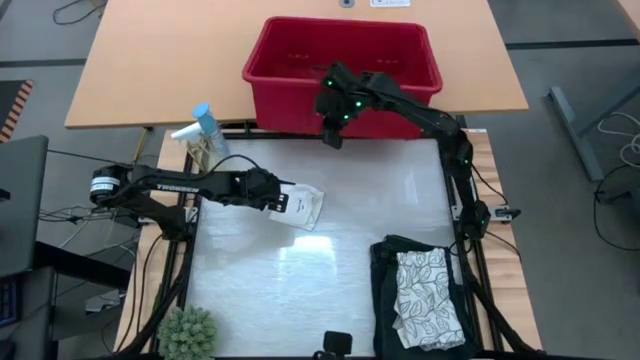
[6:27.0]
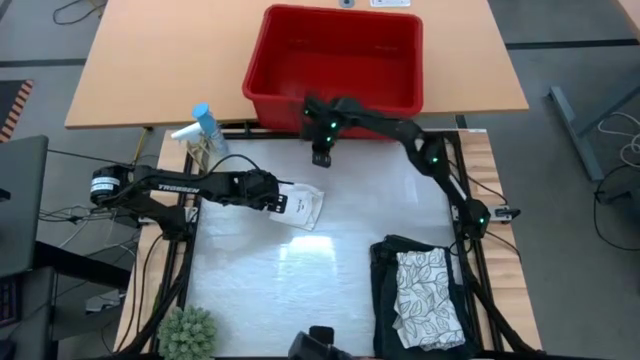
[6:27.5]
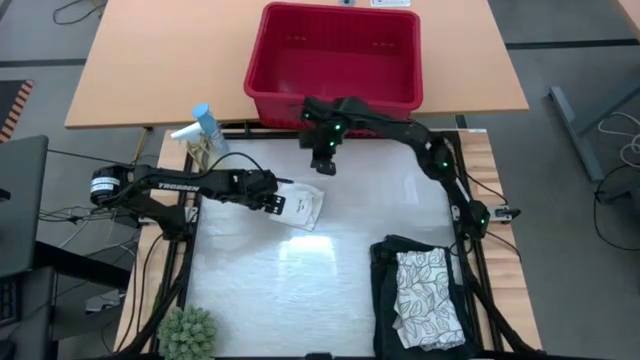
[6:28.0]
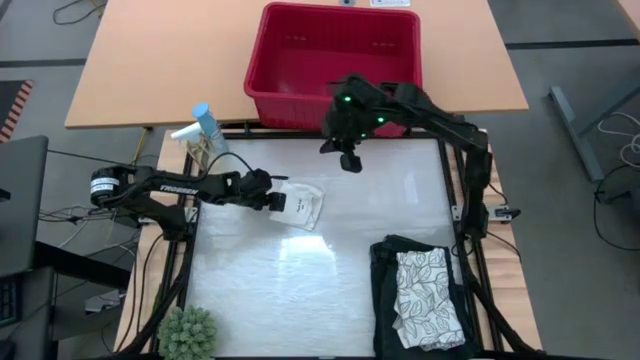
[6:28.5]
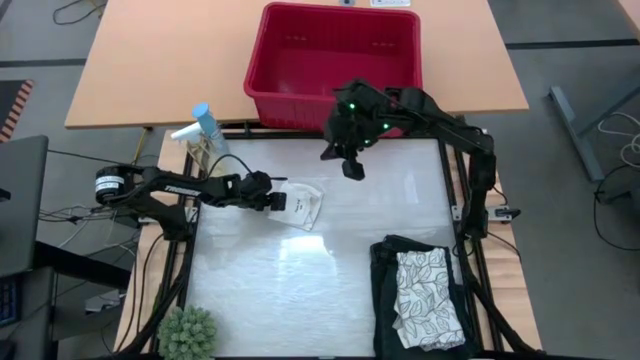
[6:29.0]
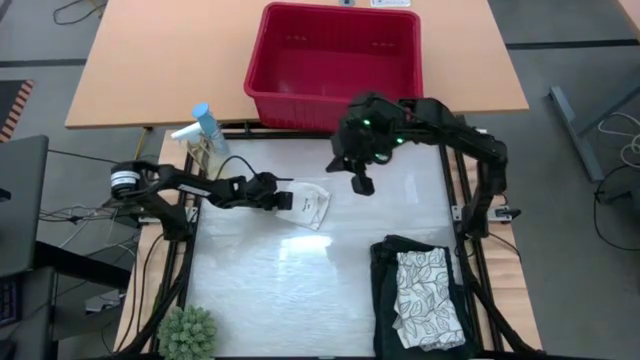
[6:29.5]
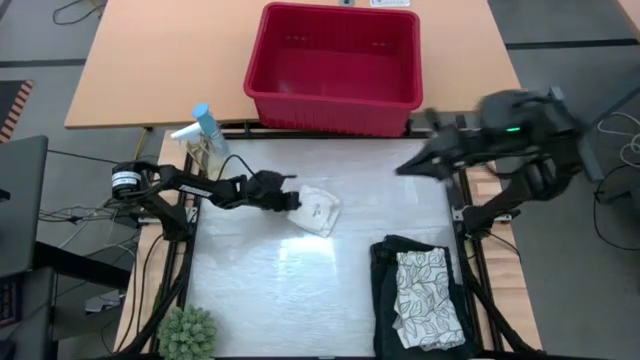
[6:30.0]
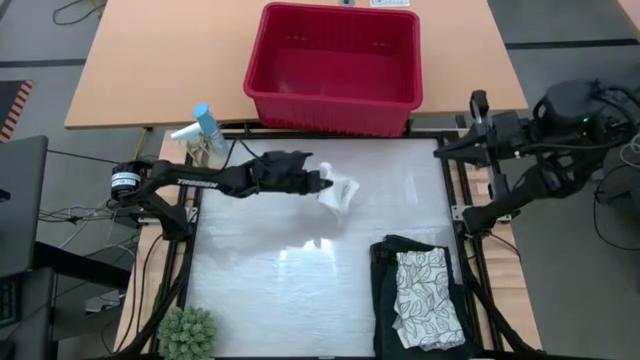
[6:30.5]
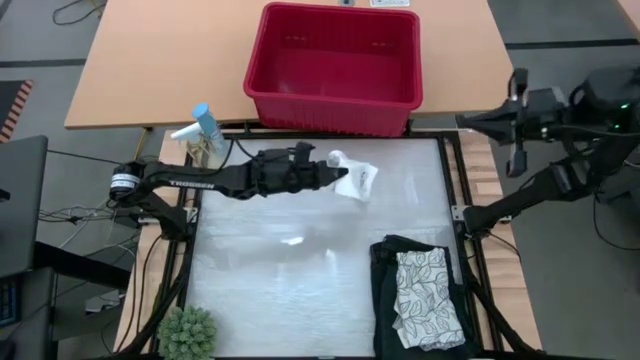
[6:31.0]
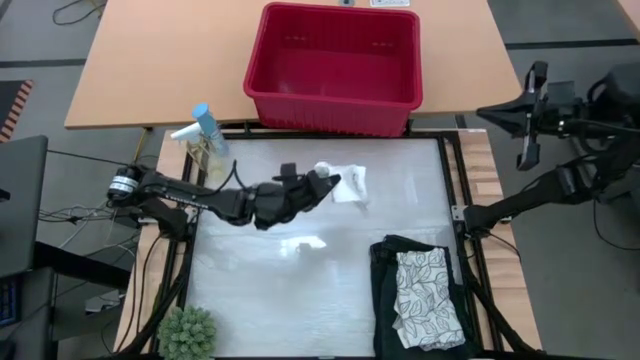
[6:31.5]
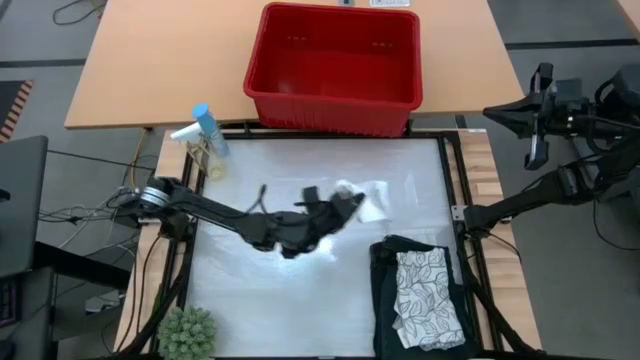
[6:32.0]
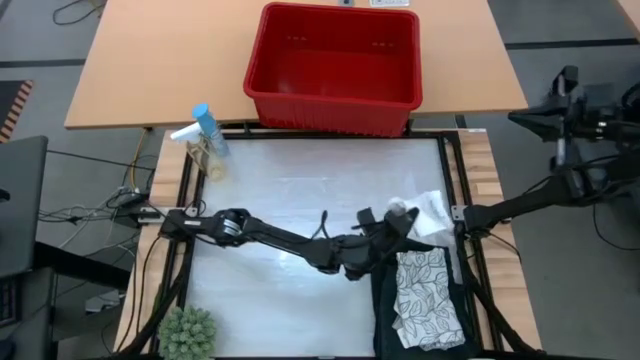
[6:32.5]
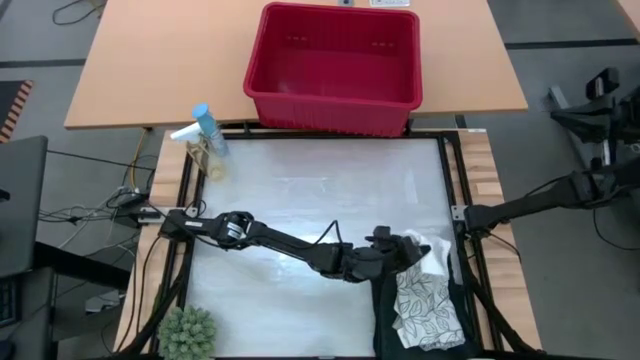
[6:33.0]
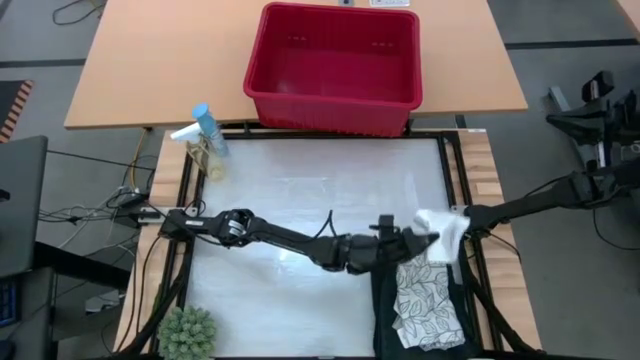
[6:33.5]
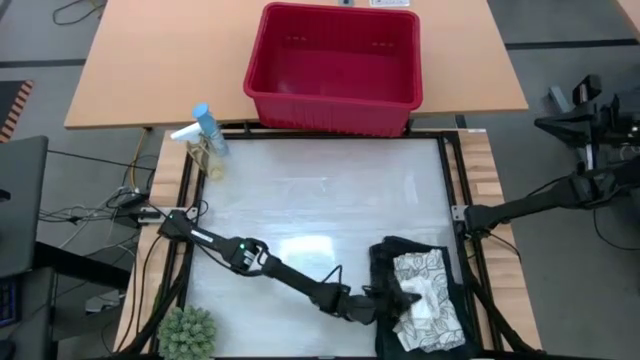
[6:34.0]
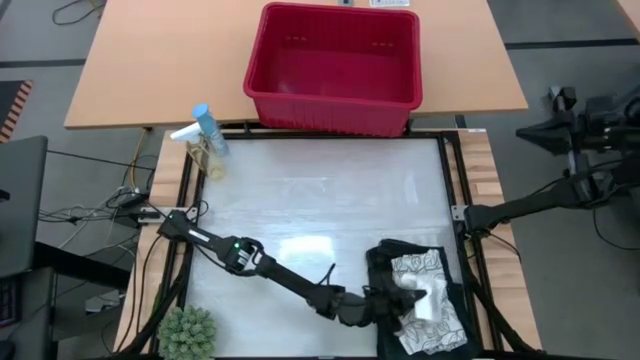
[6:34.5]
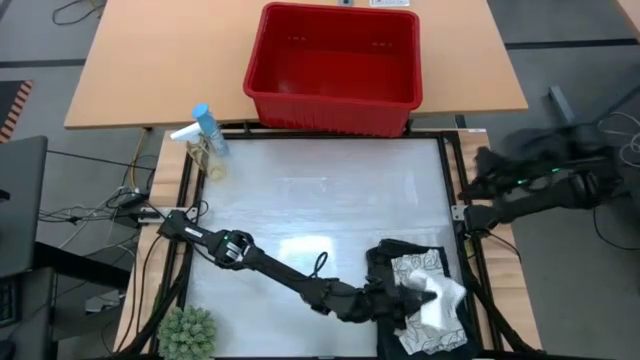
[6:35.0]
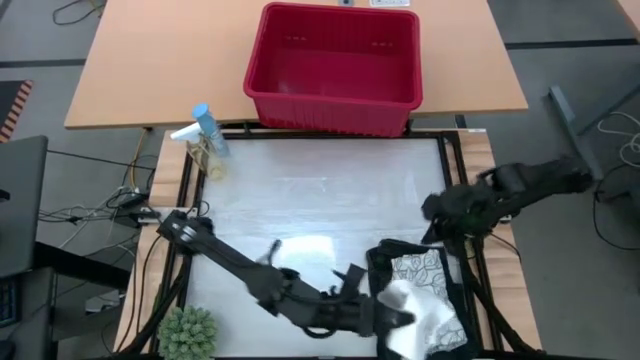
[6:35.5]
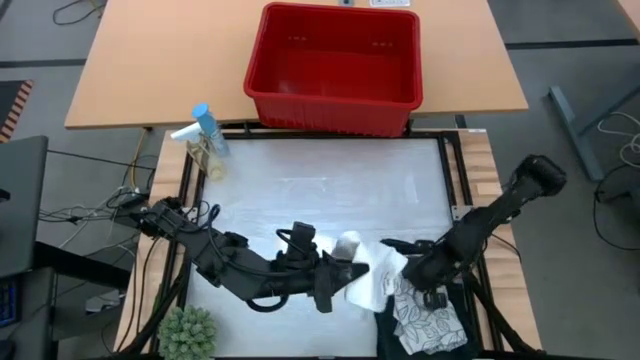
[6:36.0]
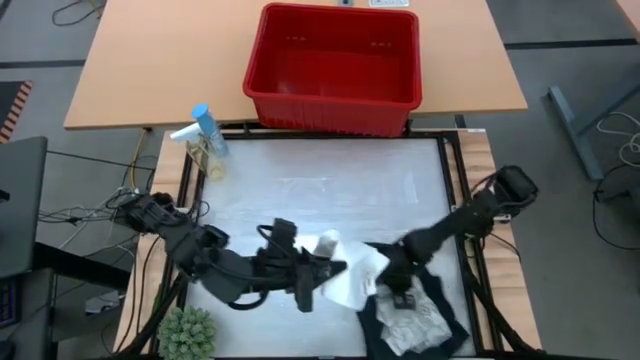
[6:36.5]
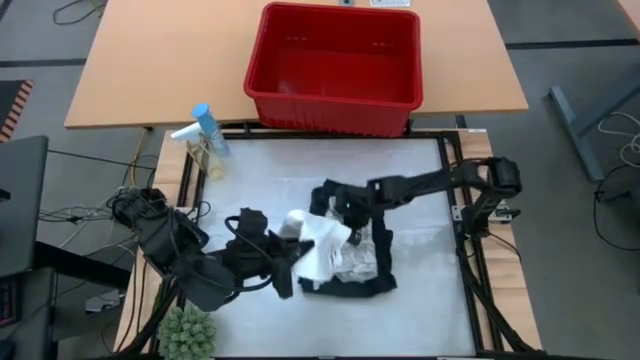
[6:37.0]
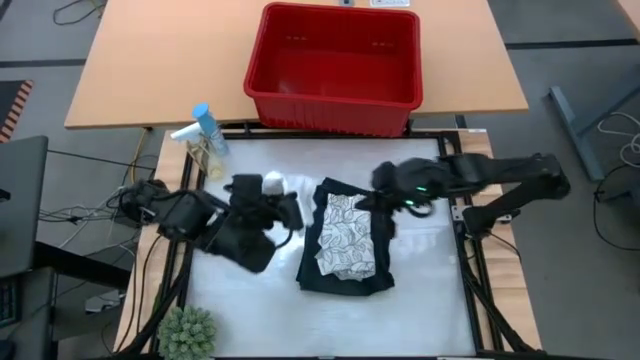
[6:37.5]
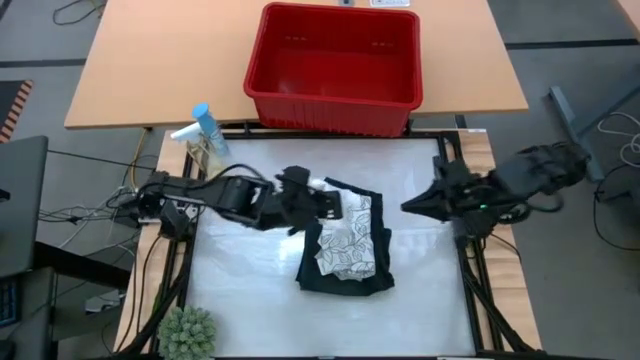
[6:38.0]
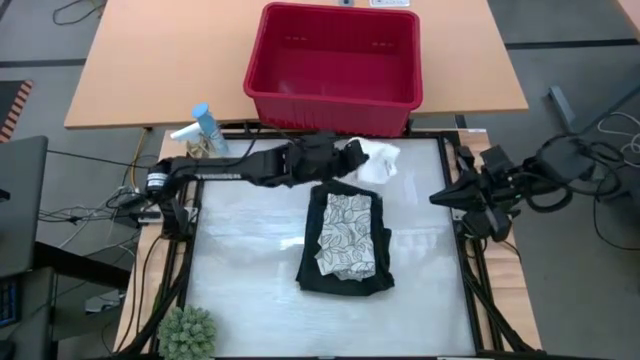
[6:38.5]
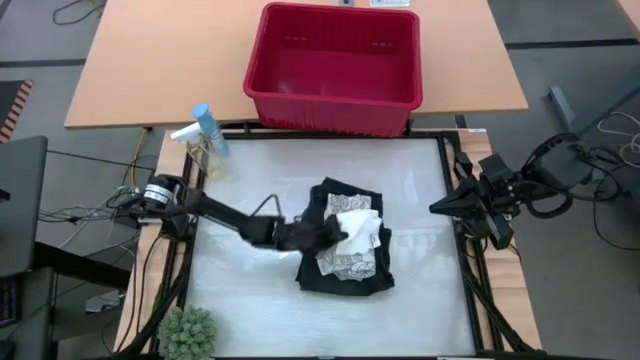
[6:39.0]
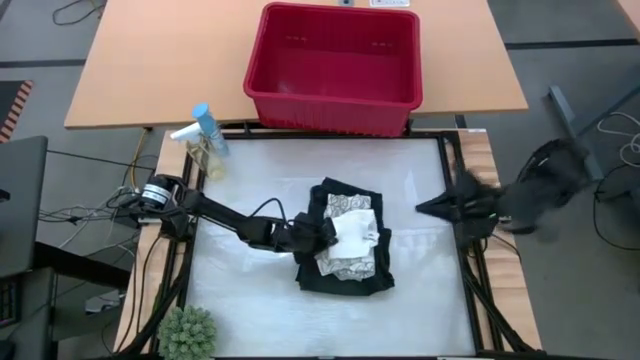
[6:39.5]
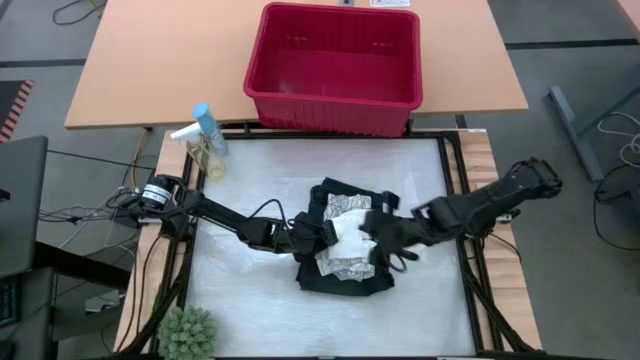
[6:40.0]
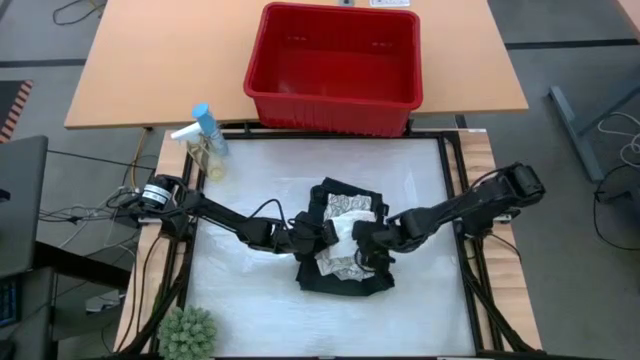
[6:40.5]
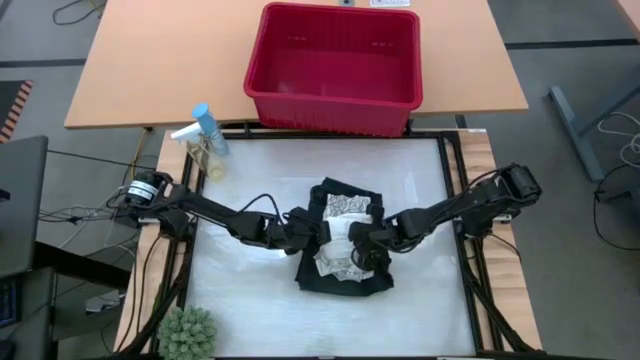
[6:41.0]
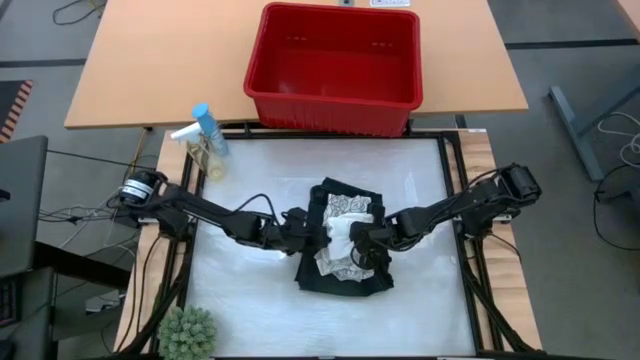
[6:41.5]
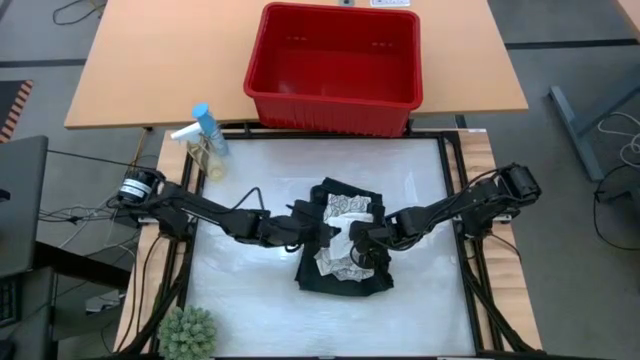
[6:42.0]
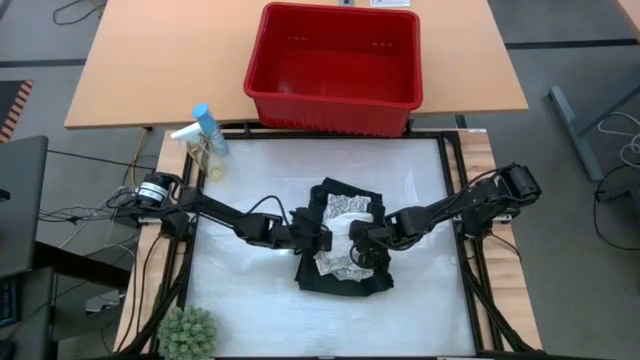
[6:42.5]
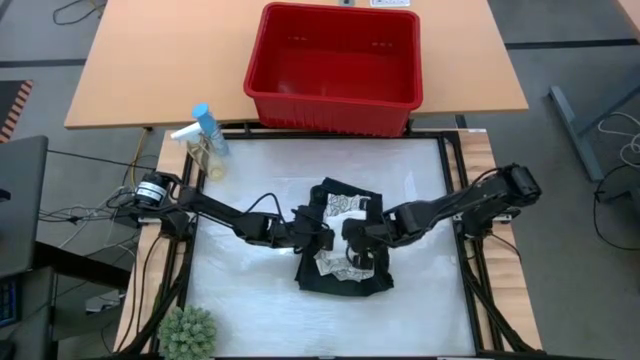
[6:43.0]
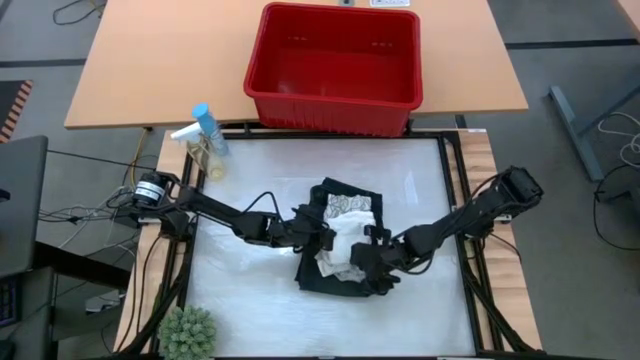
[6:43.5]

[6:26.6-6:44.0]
Task: Fold Laundry from Bin
Stack the white boxer on the white shirt

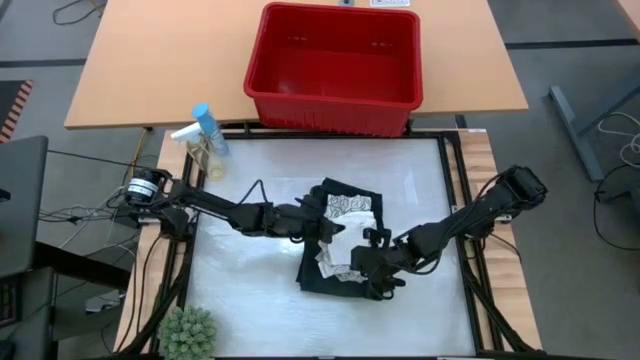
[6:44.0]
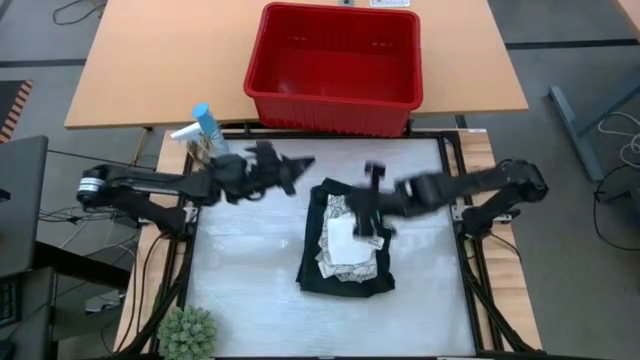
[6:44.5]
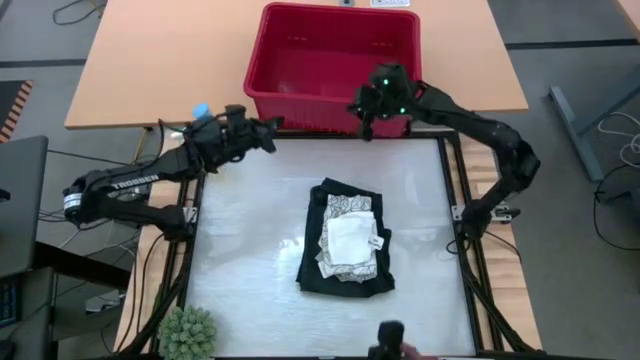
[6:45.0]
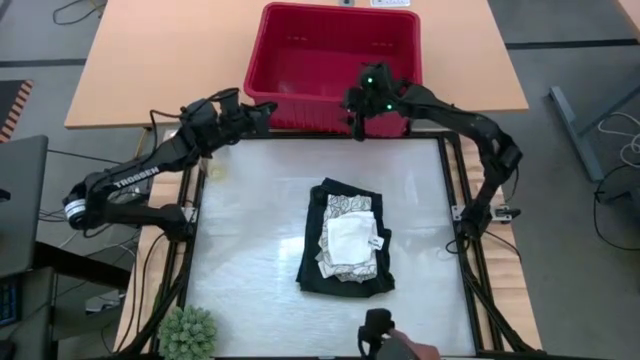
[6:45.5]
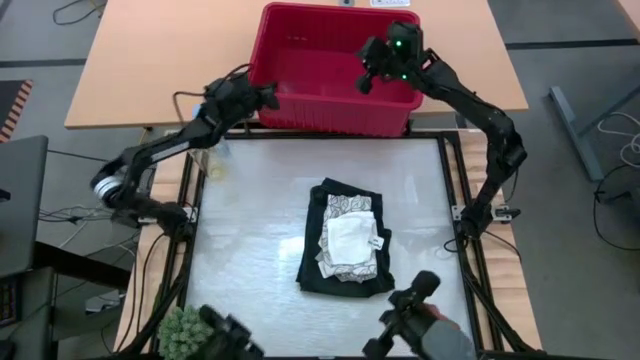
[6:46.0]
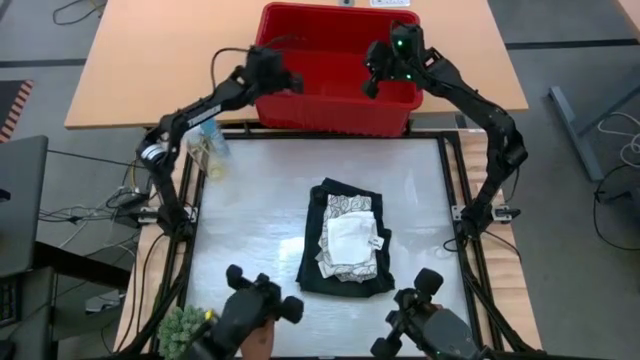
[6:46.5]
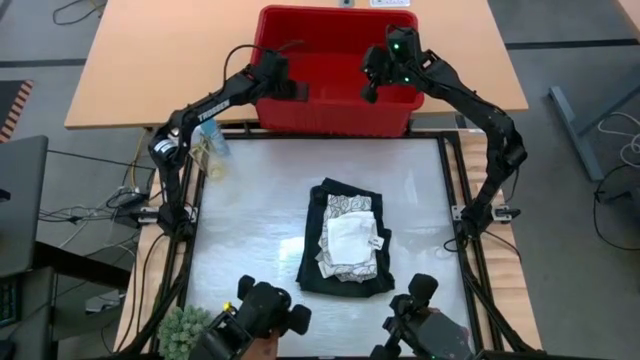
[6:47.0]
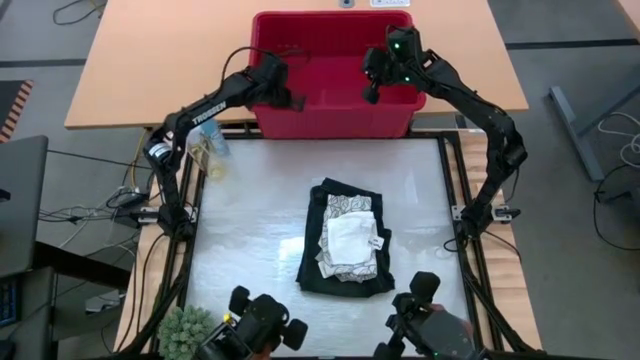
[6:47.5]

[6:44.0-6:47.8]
Adjust the red laundry bin
